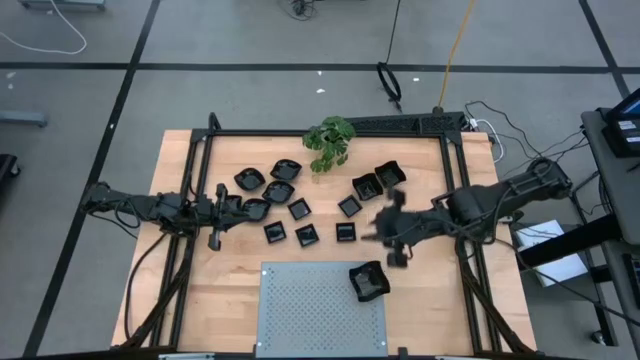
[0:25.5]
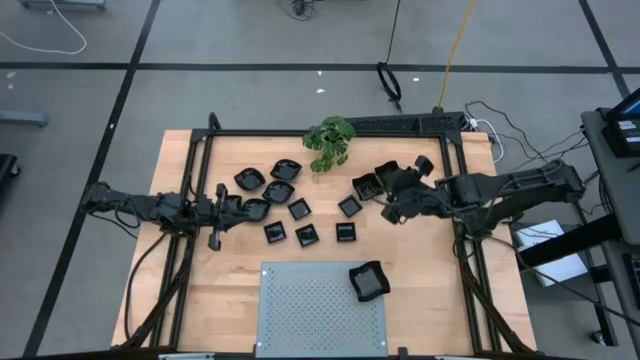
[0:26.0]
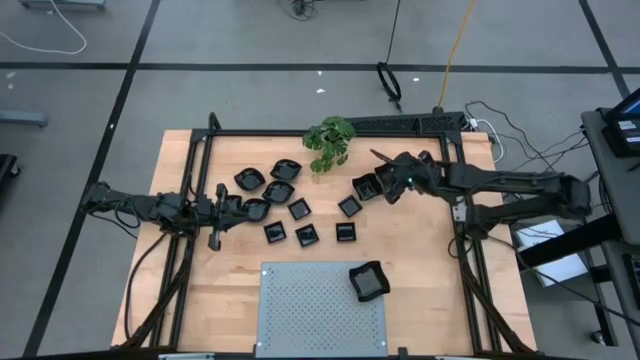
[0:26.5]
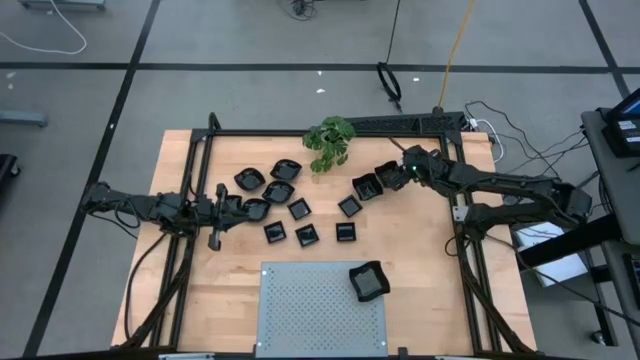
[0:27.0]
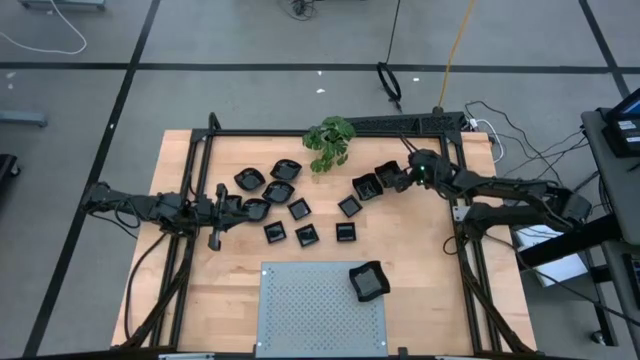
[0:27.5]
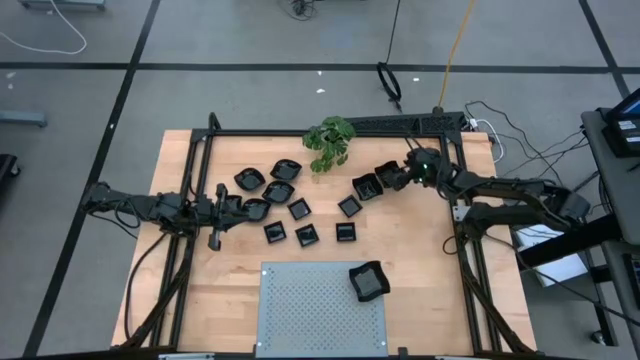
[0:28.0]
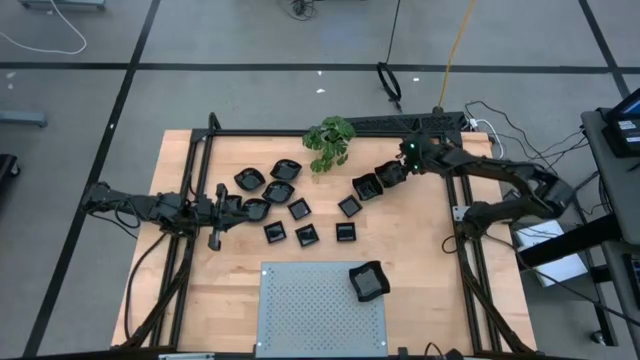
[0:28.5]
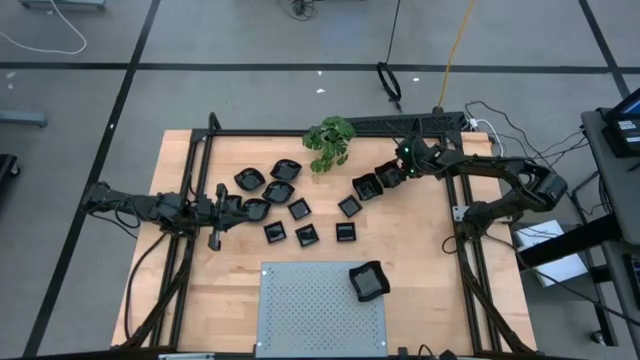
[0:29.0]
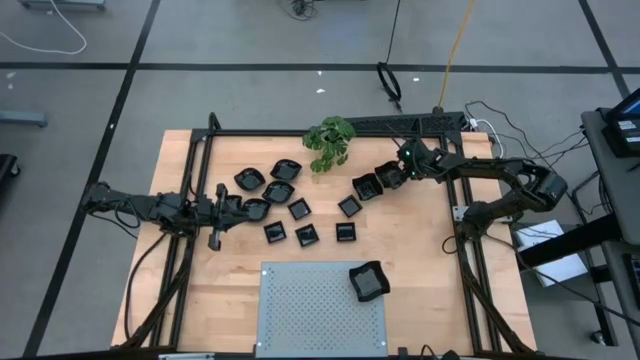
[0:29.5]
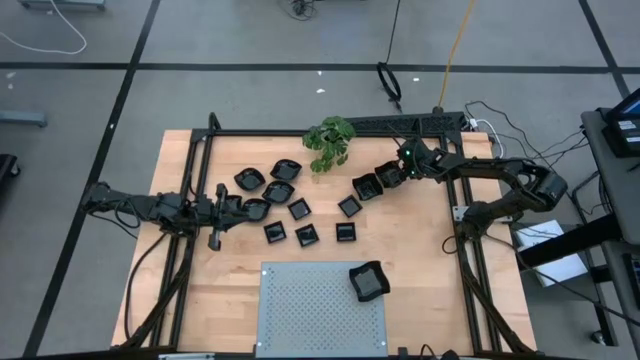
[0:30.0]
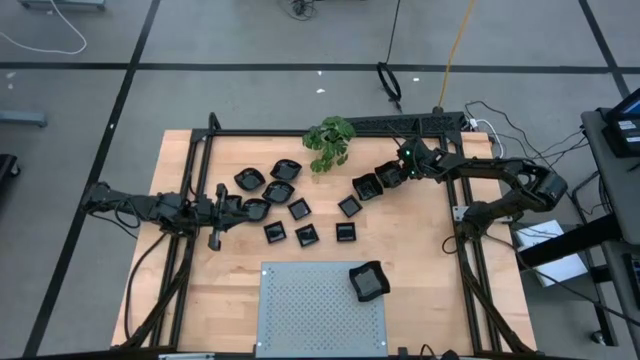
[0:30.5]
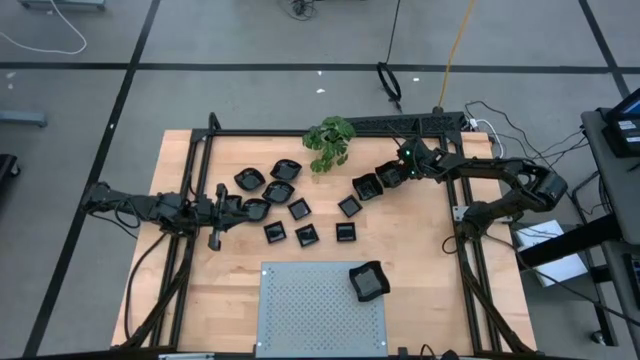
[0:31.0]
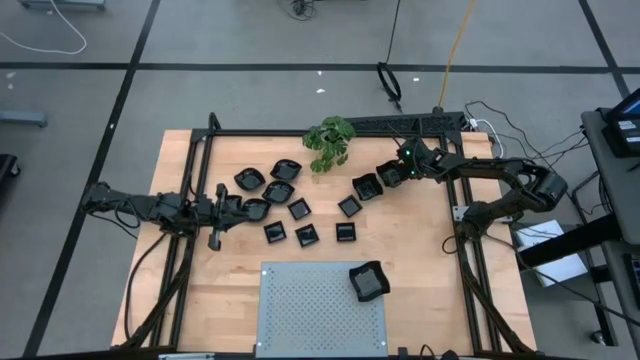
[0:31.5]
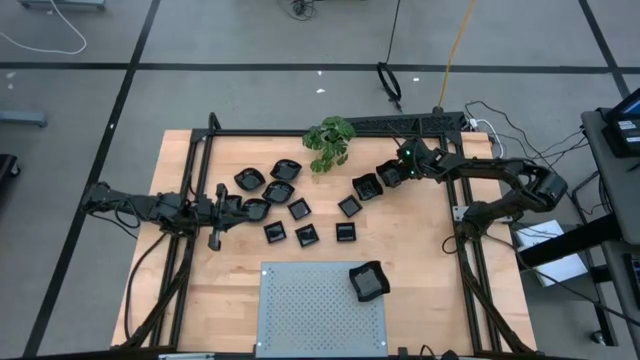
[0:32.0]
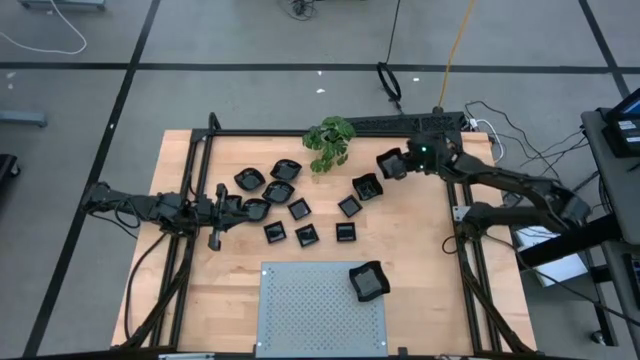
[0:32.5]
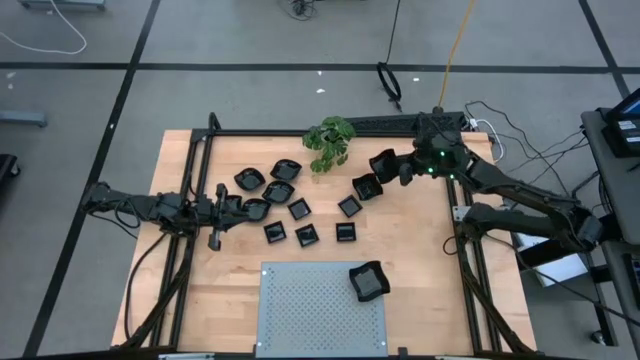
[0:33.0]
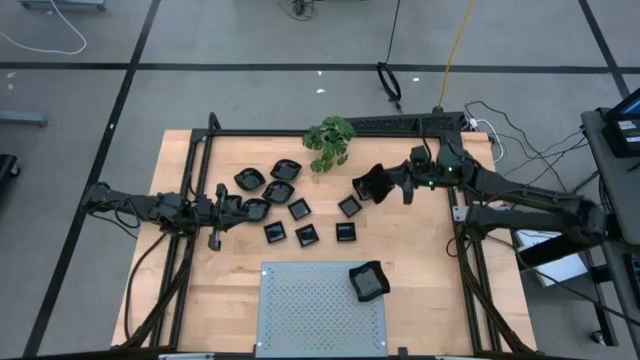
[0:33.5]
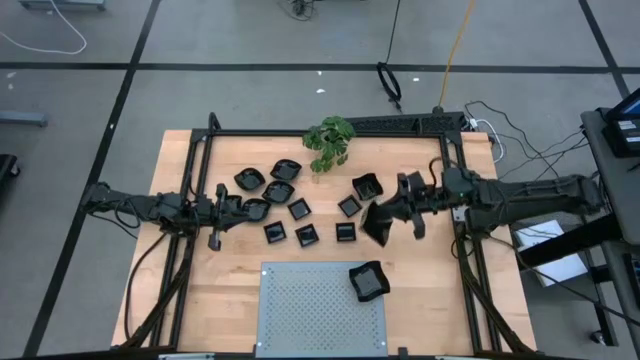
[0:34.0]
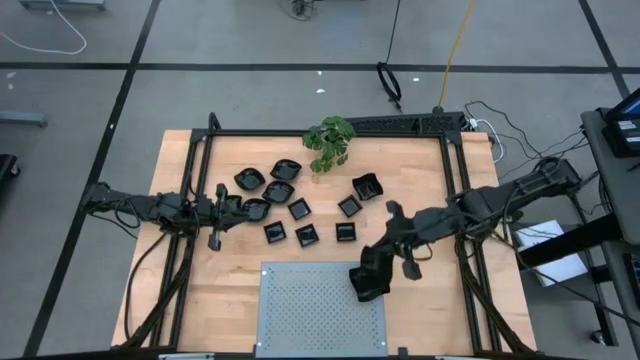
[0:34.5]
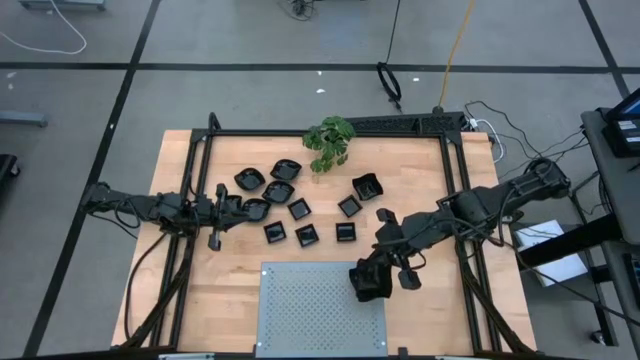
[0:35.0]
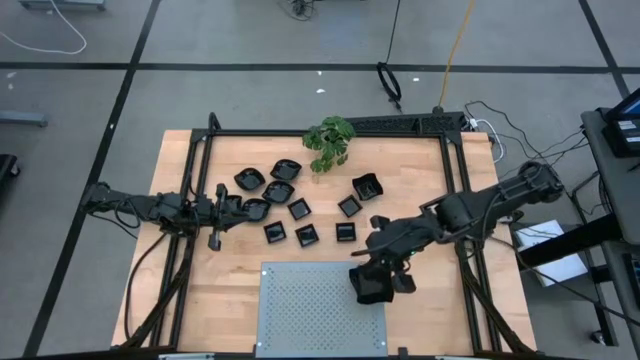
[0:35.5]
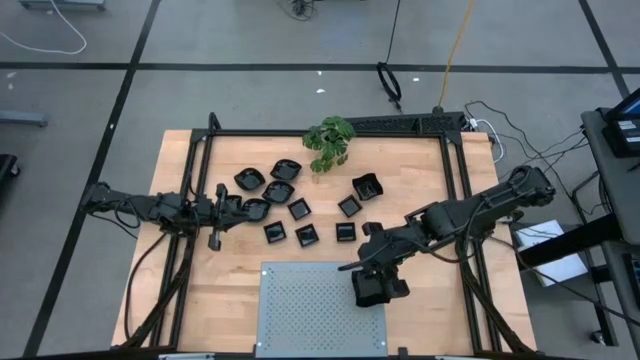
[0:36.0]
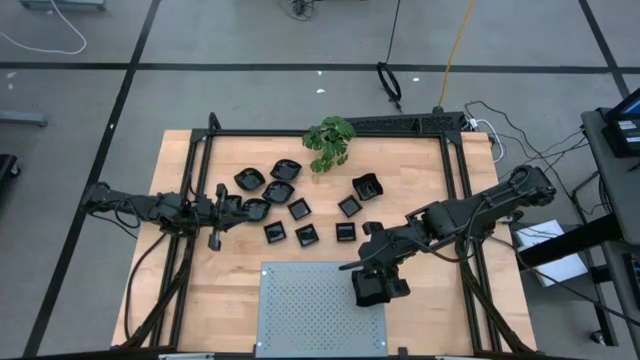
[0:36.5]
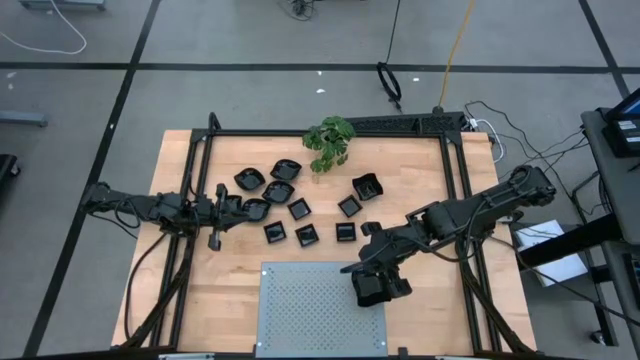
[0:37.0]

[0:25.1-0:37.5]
Task: Pick & Place Mini shaped plates
Stack the distorted square plate onto the stacked distorted square plate on the shelf

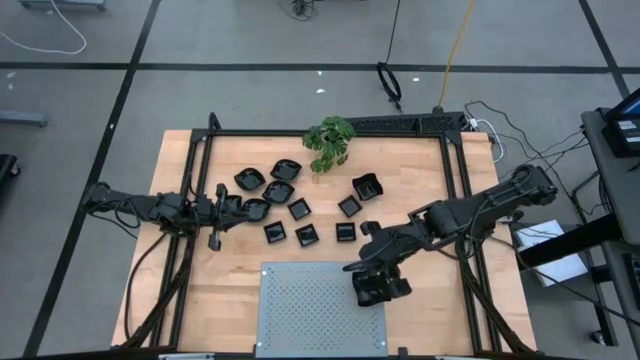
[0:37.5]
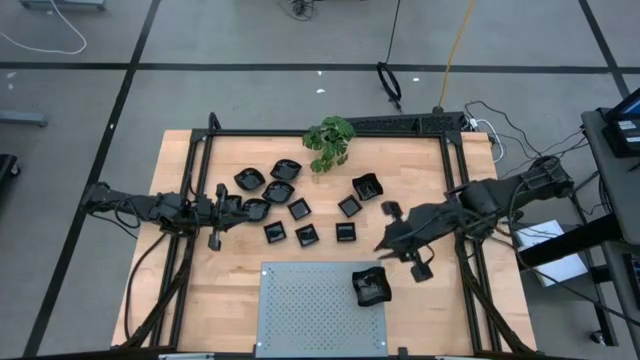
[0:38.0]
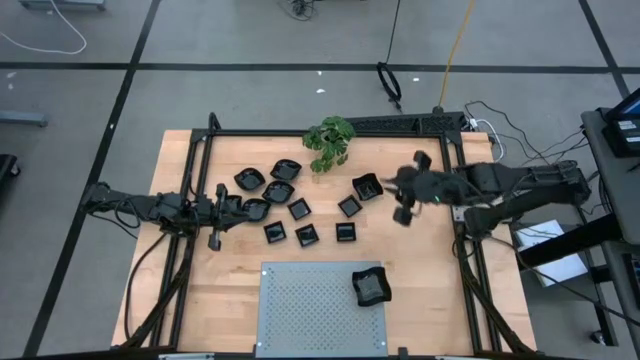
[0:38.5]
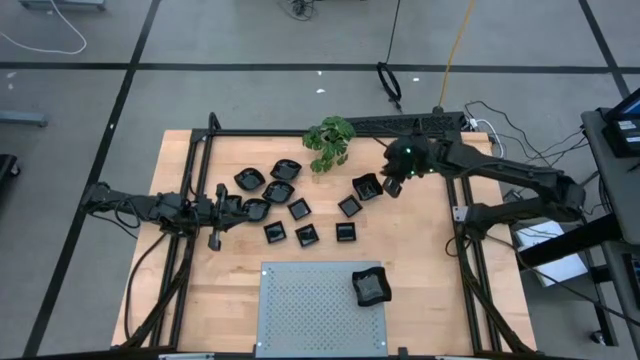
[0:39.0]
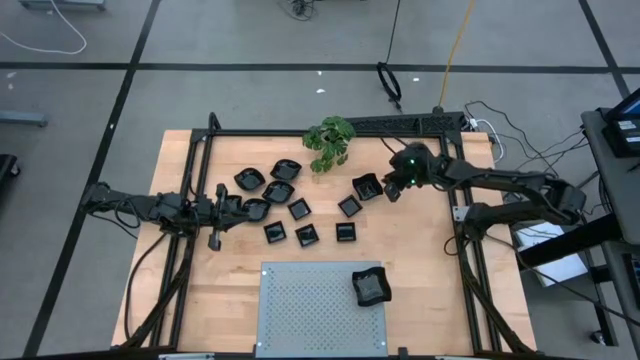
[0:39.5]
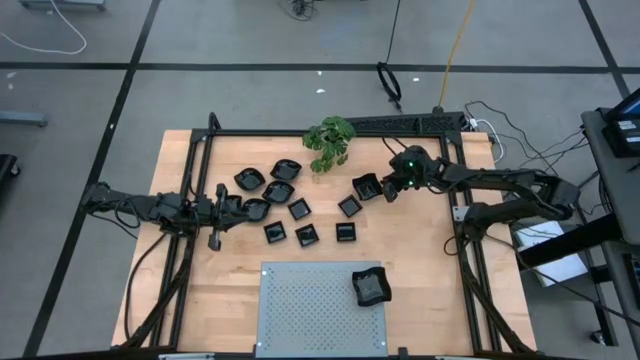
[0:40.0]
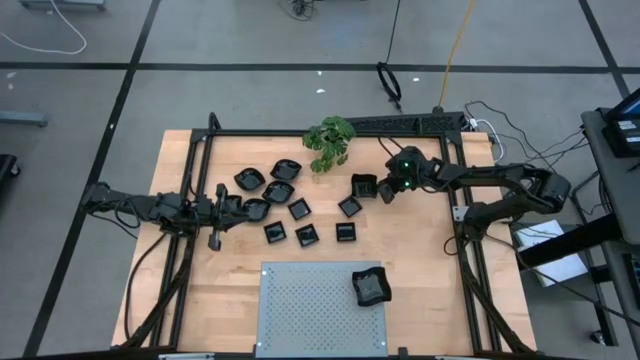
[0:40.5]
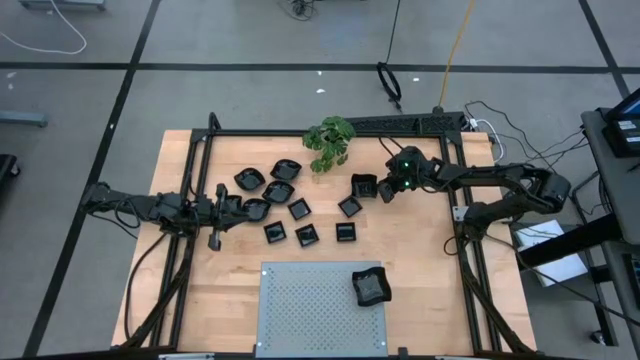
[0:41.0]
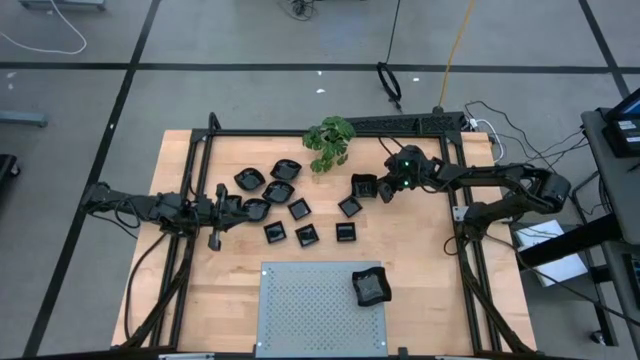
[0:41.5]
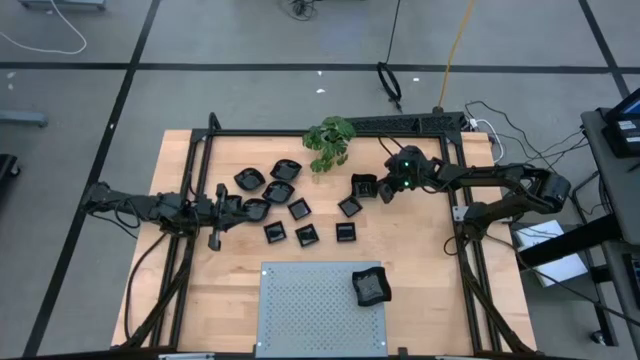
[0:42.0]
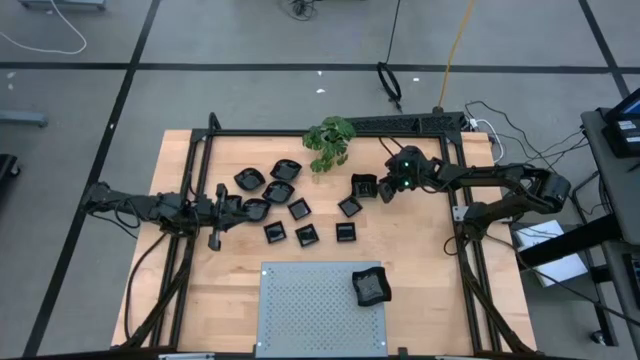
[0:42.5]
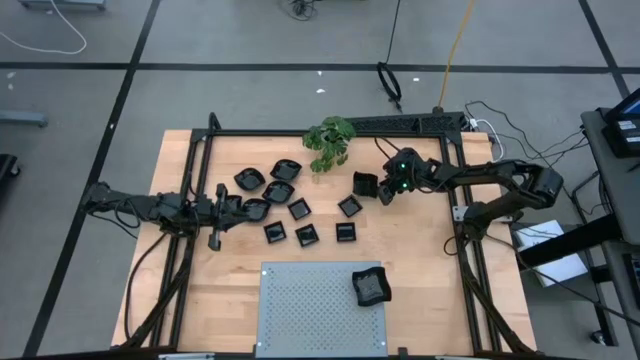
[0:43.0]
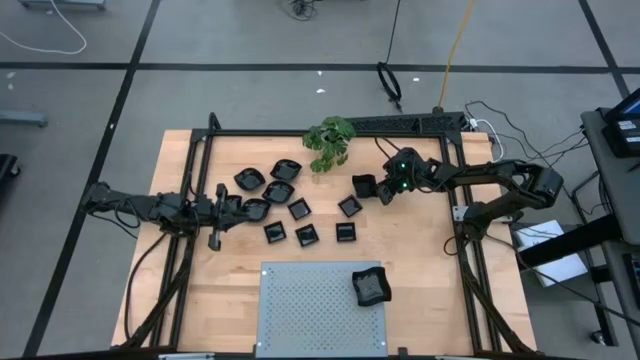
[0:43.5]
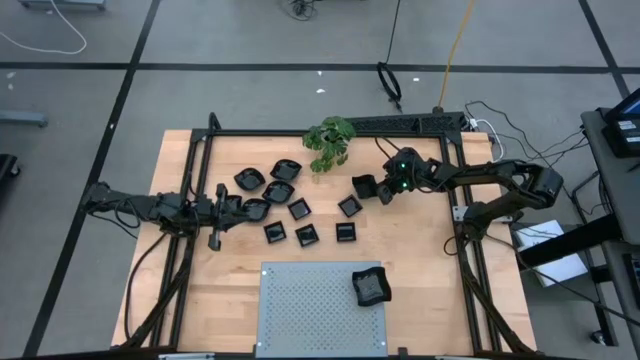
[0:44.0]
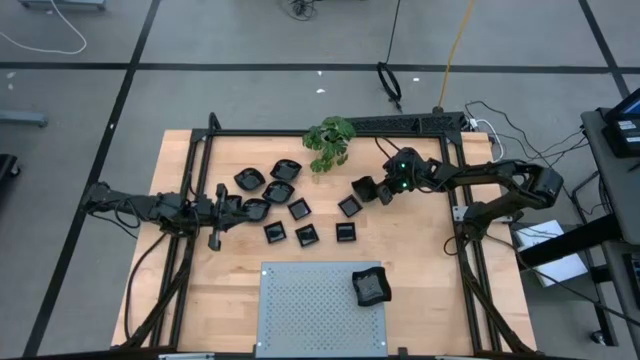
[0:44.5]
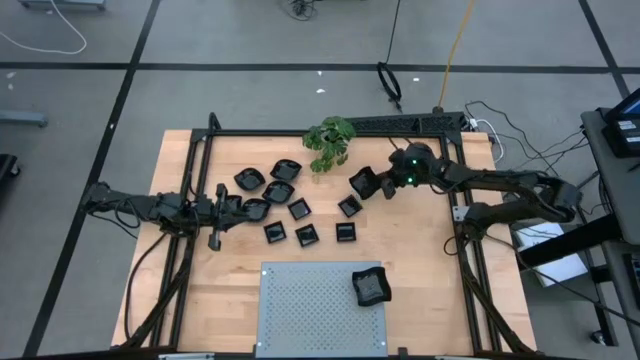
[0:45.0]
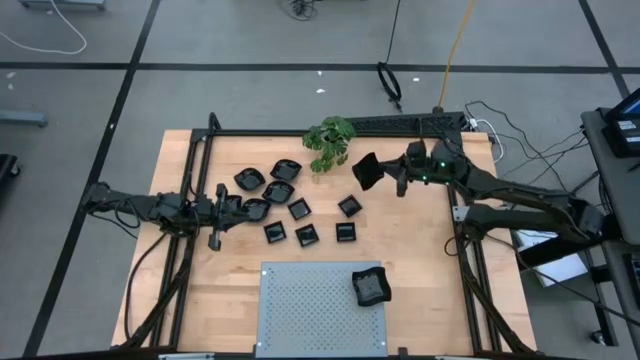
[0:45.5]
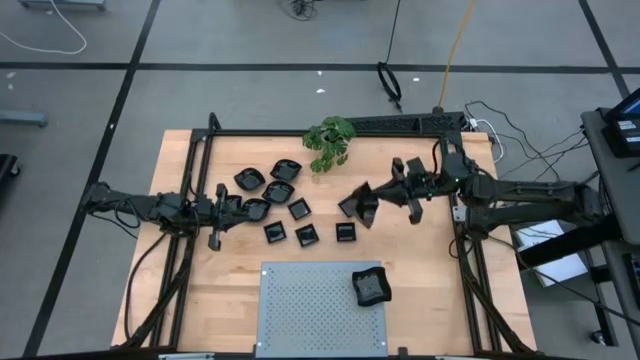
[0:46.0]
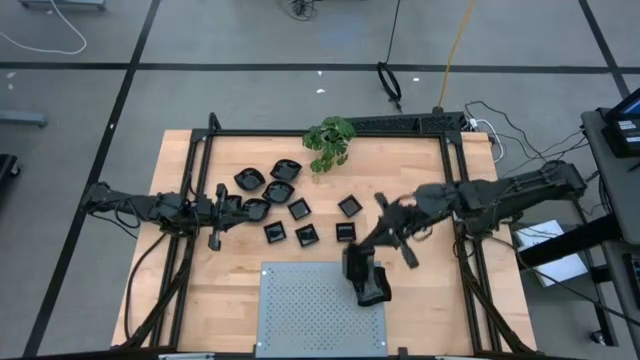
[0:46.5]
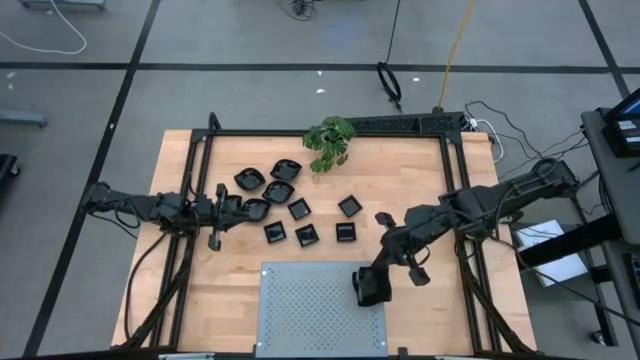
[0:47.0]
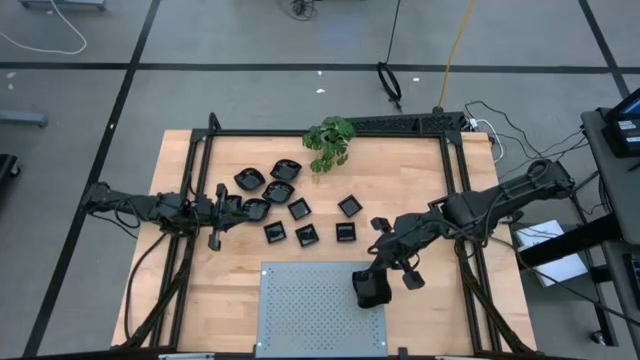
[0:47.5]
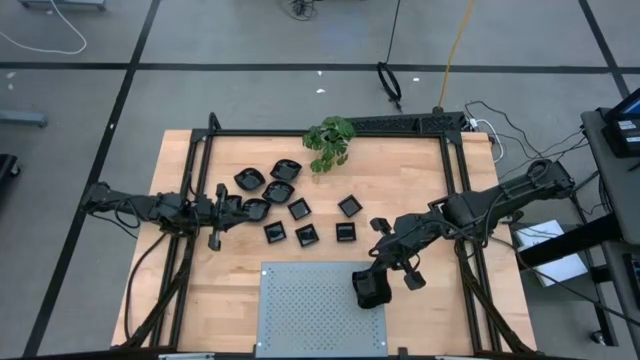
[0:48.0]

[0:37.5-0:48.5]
Stack the distorted square plate onto the stacked distorted square plate on the shelf
